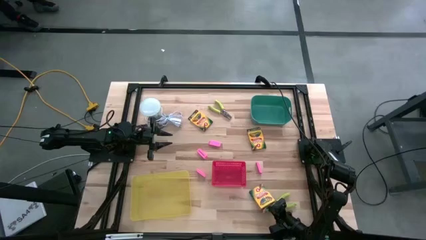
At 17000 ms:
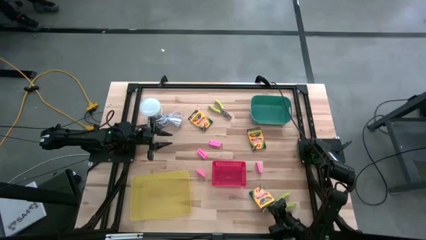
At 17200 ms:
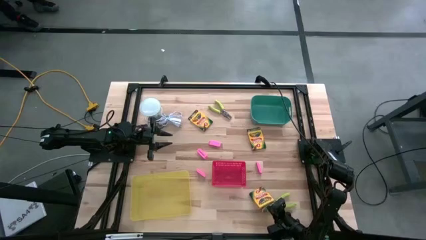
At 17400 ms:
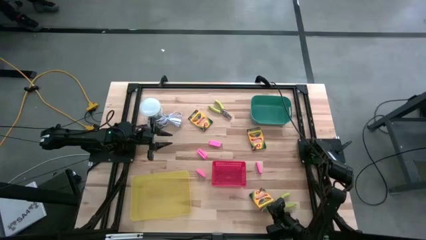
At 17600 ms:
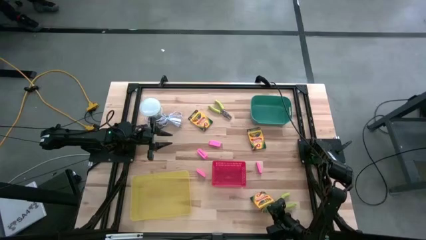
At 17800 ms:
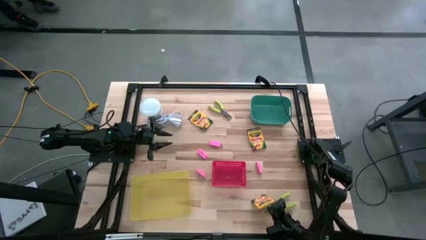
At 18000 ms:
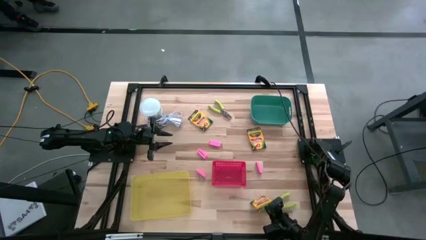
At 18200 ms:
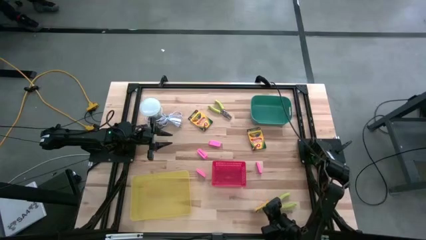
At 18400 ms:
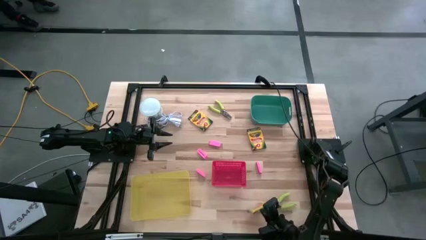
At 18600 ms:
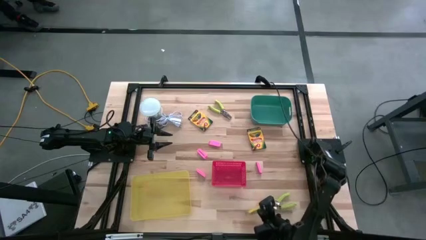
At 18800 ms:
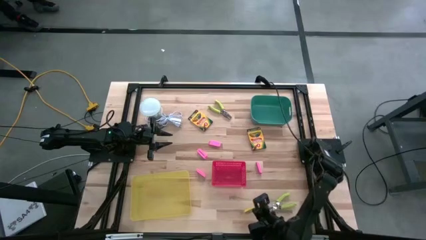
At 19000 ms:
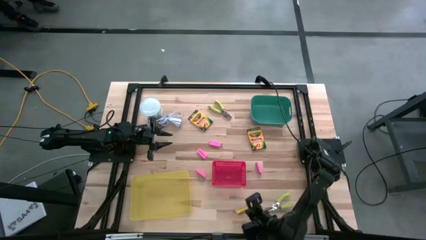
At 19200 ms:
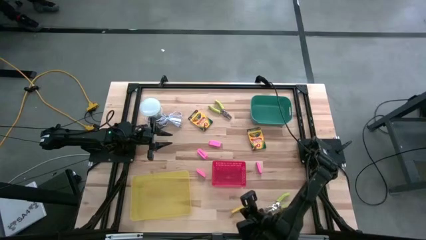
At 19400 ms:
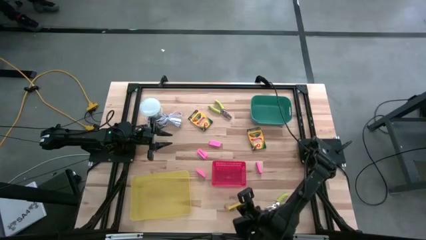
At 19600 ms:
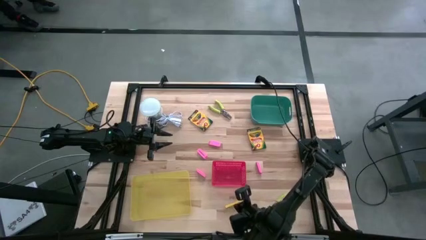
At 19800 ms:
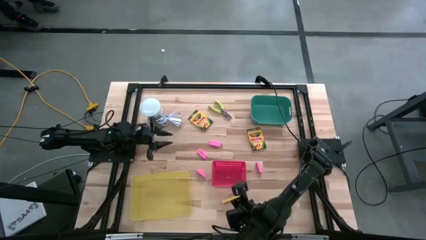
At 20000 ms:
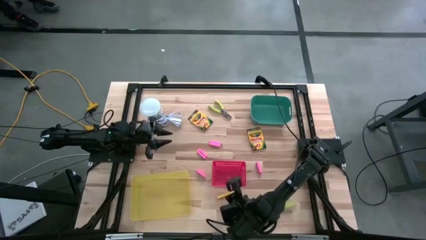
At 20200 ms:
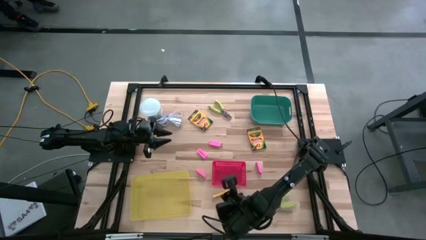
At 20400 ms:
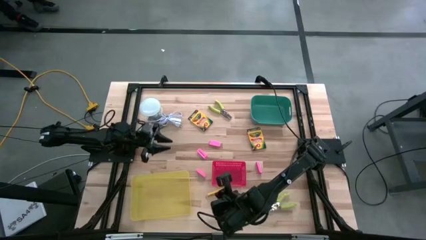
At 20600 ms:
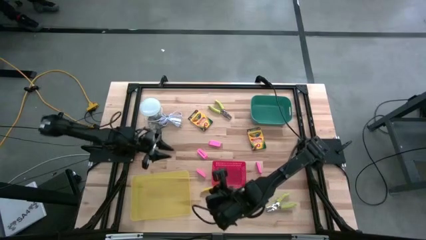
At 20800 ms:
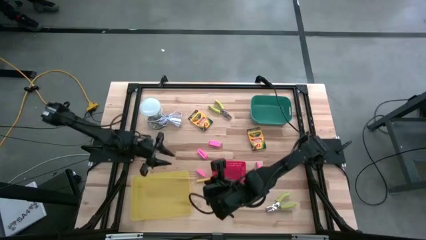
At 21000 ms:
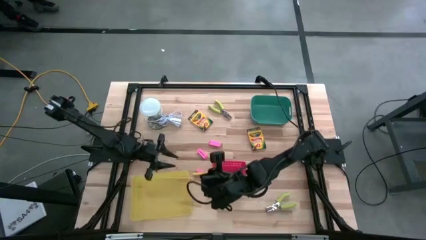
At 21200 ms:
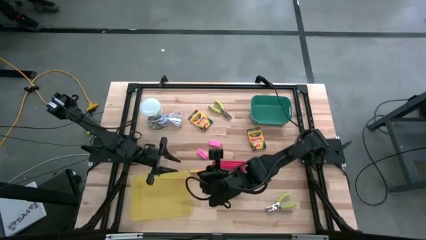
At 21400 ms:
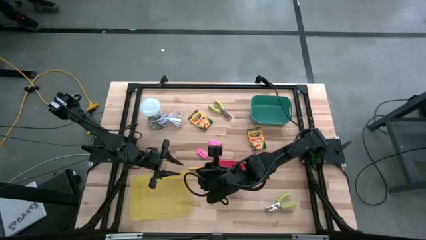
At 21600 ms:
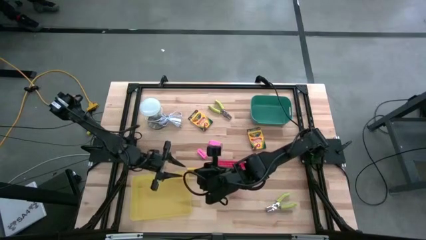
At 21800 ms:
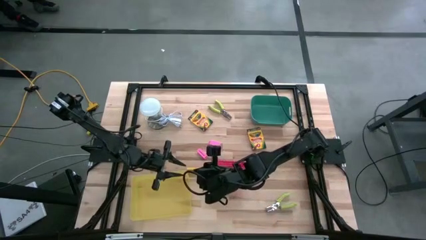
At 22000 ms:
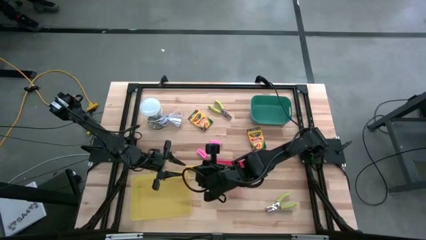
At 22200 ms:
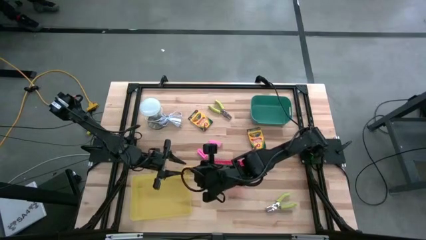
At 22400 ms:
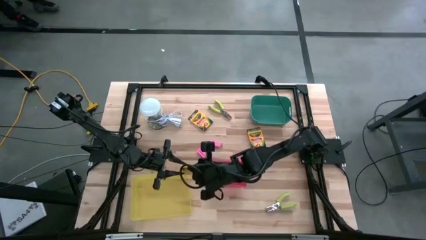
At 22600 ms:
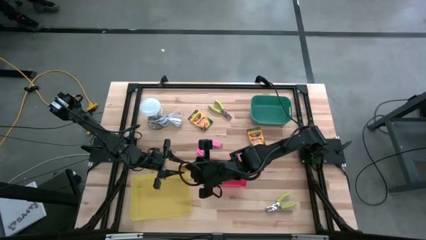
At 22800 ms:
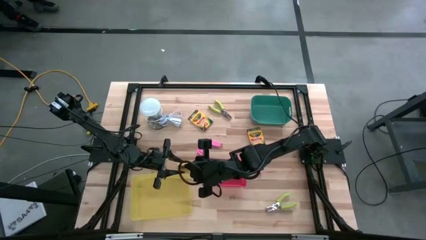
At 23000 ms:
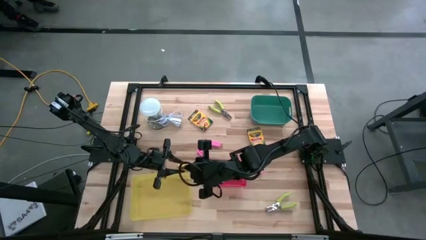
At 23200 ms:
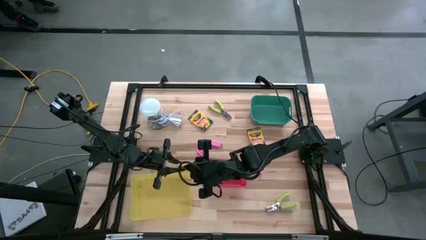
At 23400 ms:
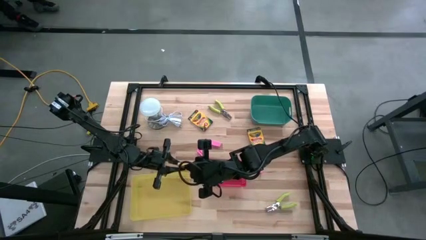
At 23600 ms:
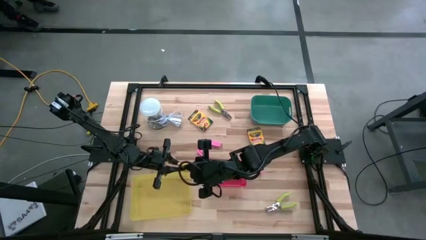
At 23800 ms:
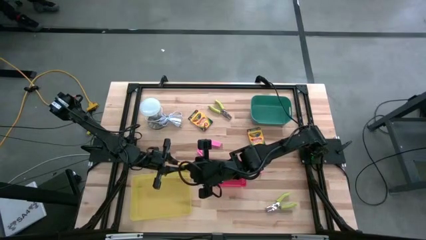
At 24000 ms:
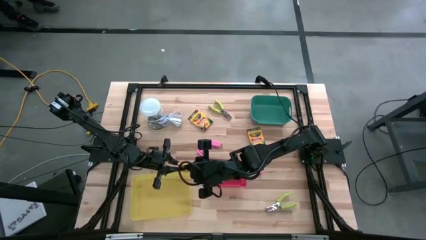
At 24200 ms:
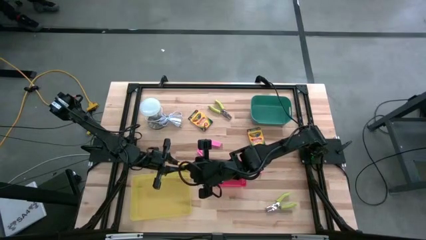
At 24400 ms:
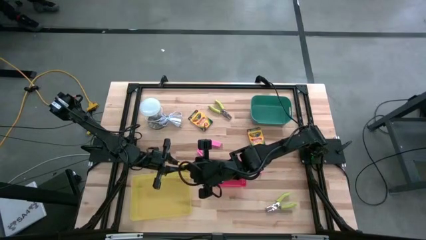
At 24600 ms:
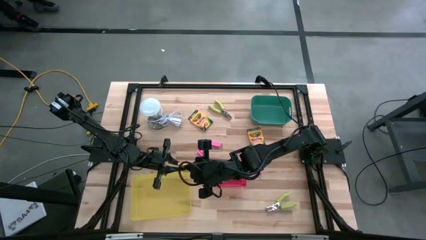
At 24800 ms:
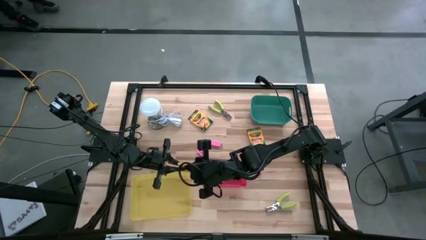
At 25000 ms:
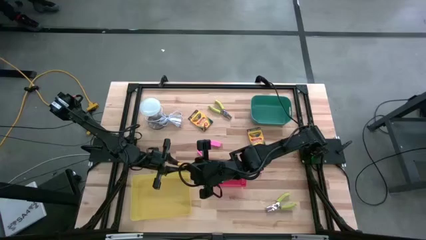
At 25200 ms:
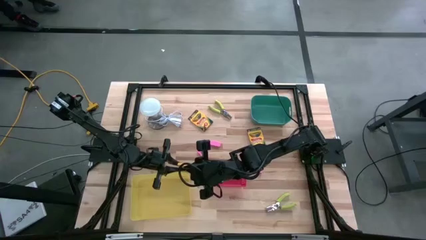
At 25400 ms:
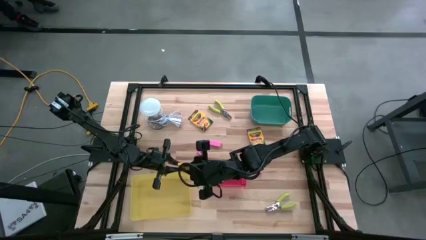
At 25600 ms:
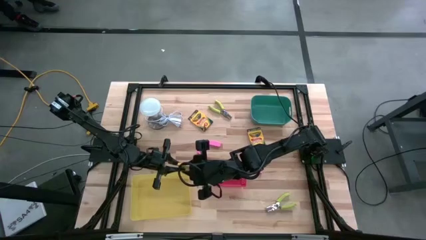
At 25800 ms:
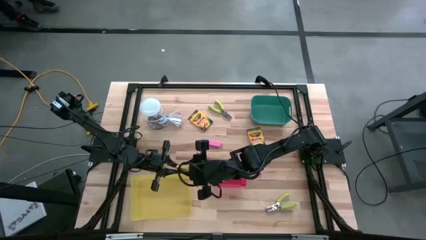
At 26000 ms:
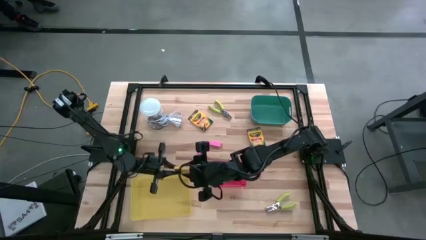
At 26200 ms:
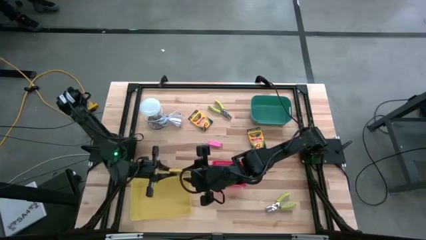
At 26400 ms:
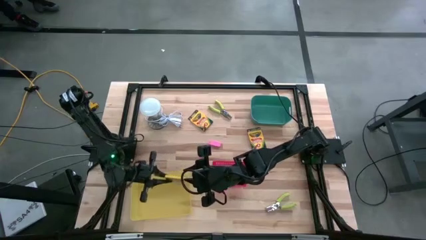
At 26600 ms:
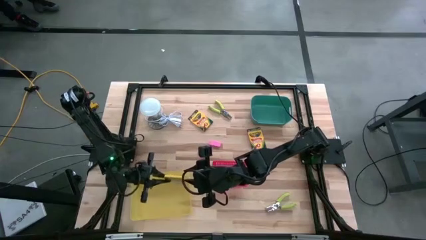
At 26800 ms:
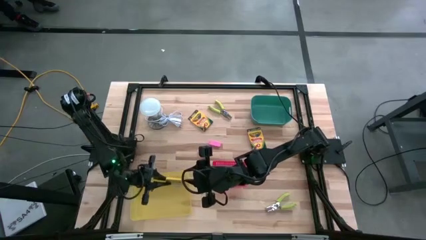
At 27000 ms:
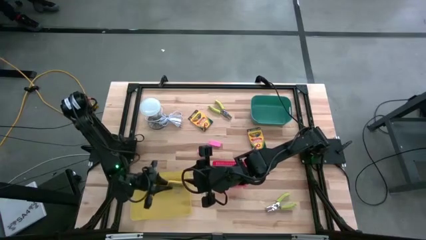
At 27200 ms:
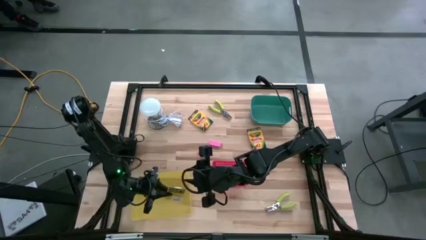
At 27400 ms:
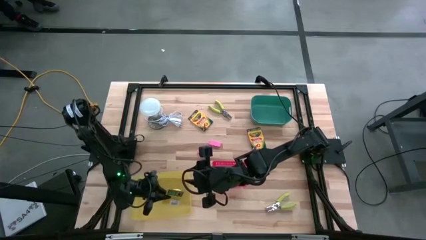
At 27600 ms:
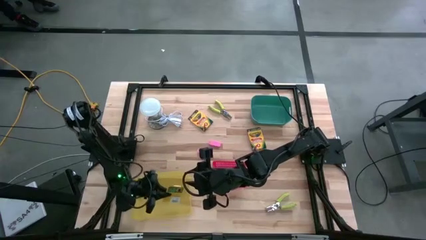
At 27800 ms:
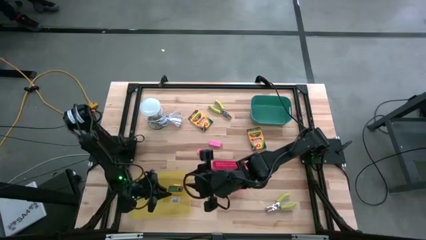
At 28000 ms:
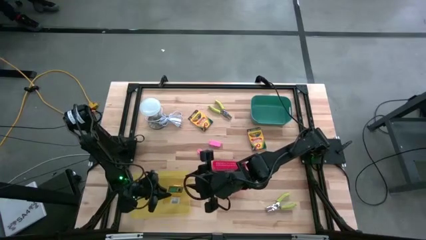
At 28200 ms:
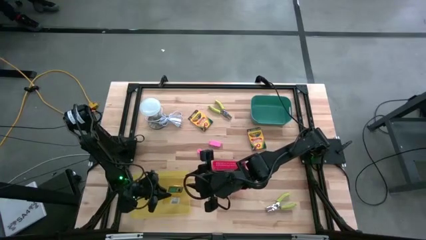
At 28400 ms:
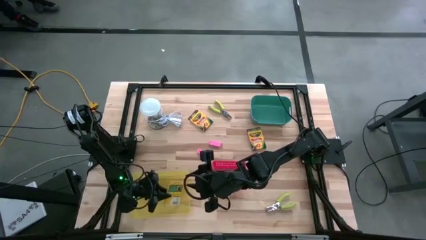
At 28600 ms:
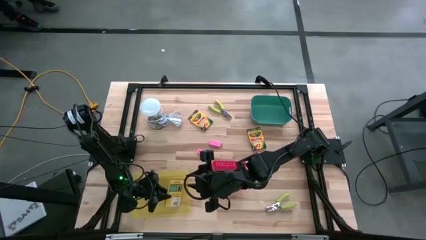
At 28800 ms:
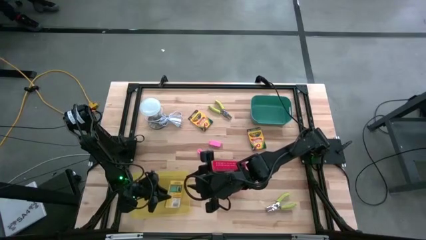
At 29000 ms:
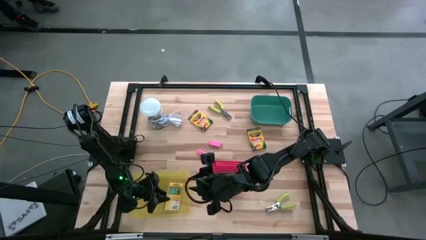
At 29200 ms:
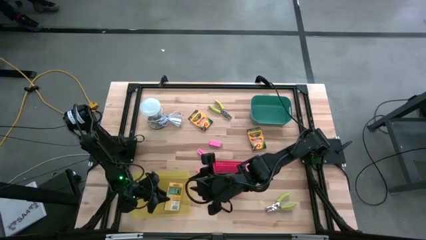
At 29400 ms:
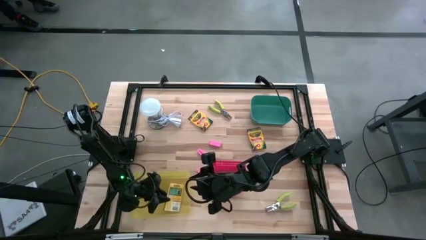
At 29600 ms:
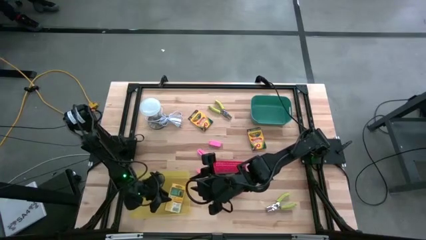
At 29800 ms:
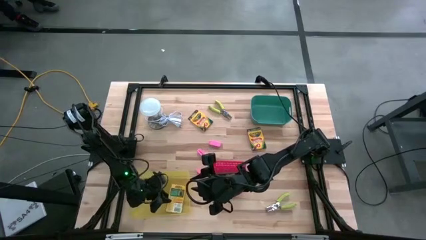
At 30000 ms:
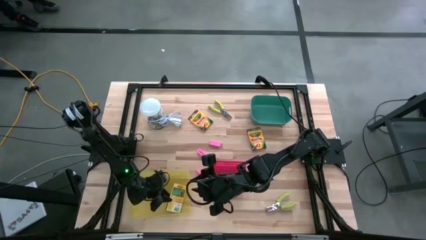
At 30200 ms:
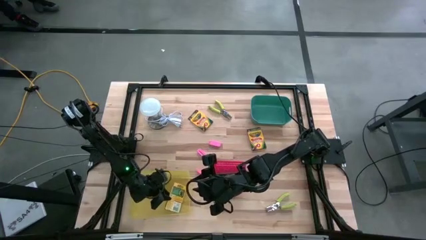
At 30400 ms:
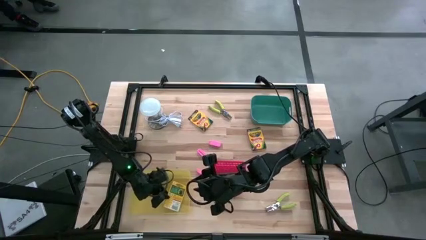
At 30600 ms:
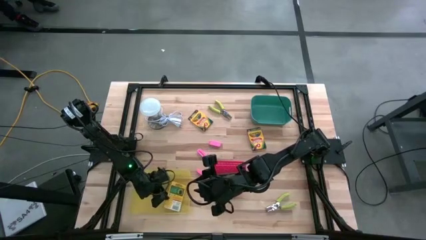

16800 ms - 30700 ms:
Task: Pick & Place School Supplies
Put the bottom yellow crayon box into the yellow bin
